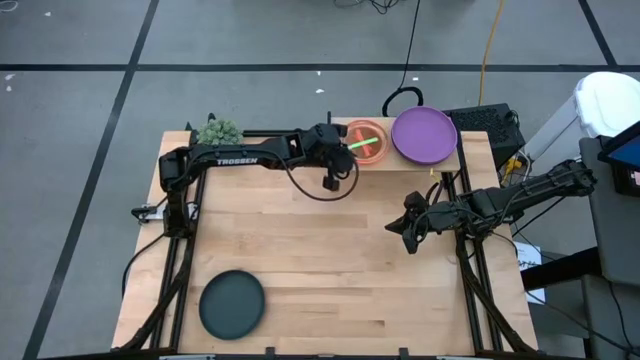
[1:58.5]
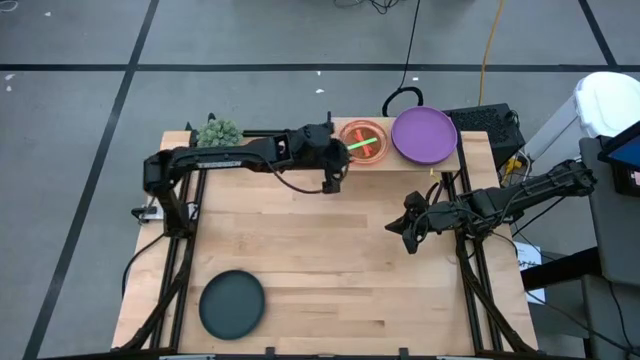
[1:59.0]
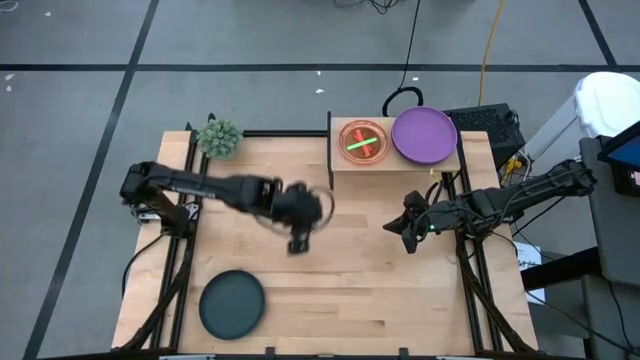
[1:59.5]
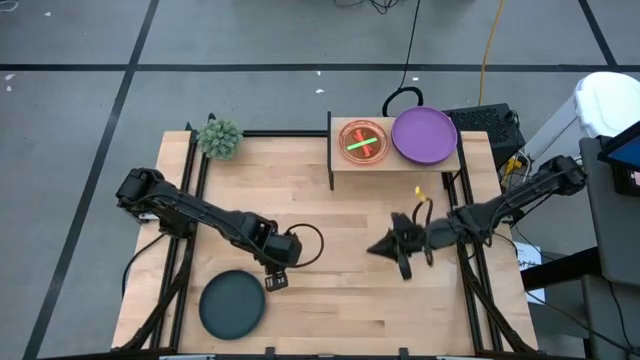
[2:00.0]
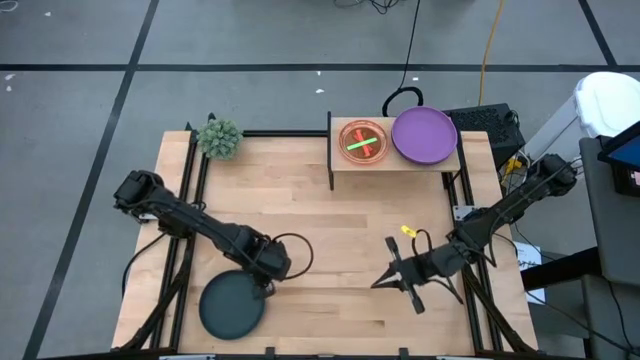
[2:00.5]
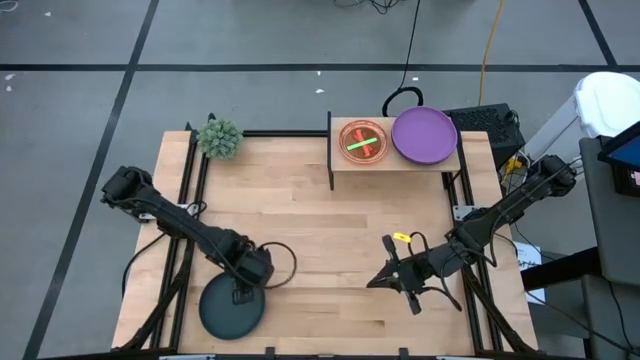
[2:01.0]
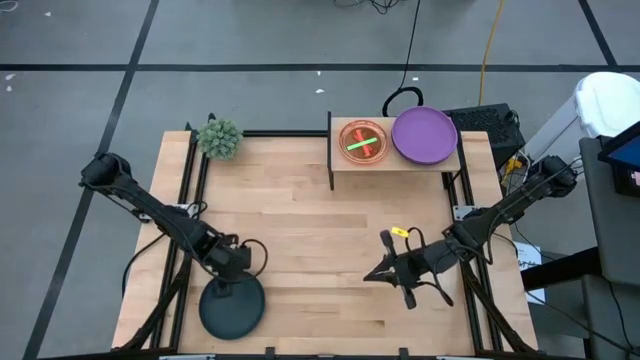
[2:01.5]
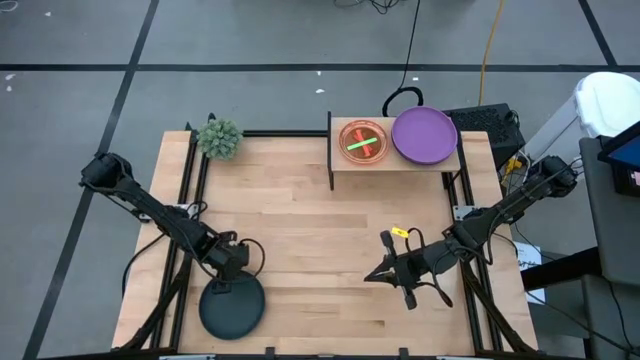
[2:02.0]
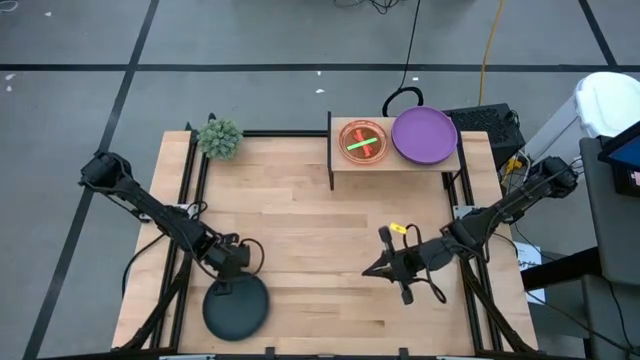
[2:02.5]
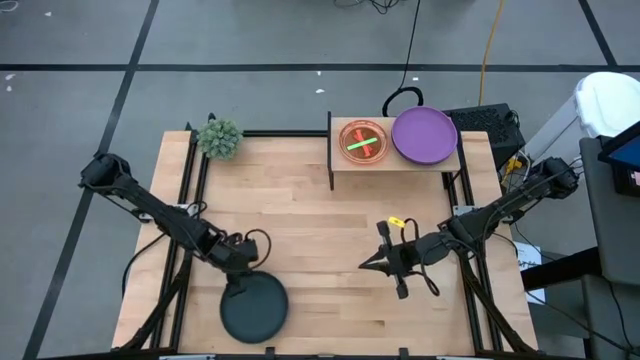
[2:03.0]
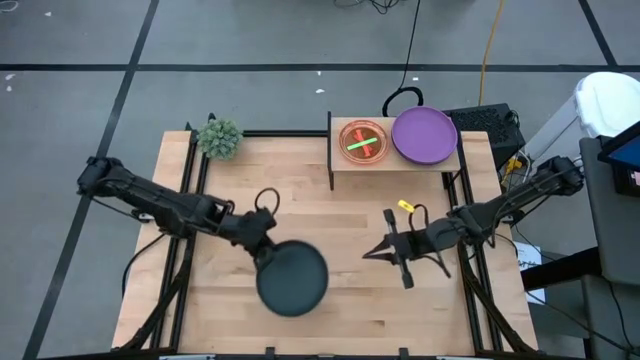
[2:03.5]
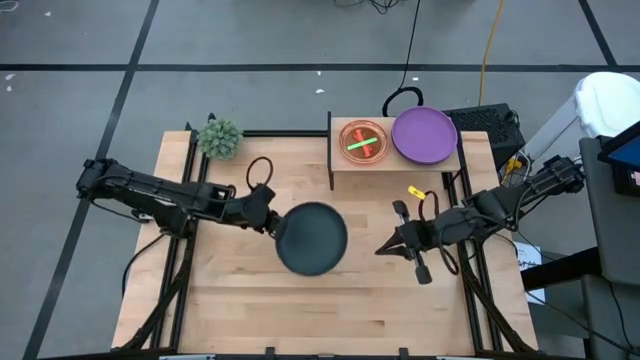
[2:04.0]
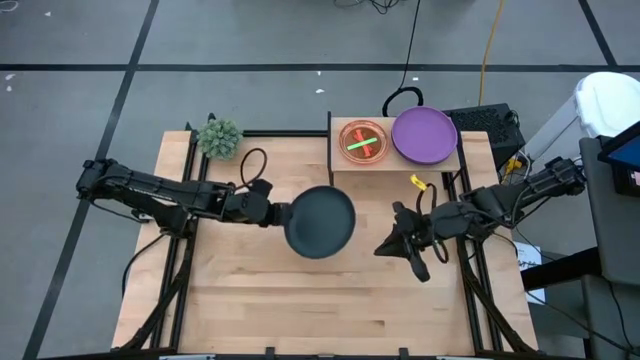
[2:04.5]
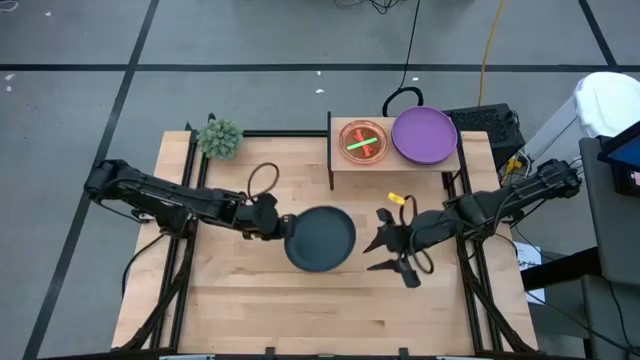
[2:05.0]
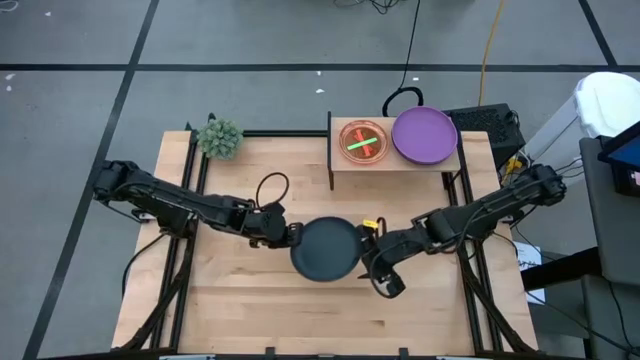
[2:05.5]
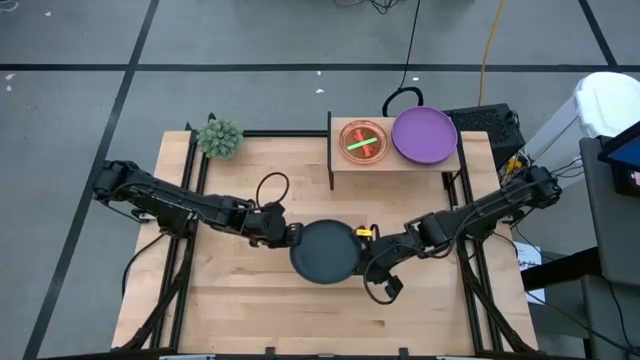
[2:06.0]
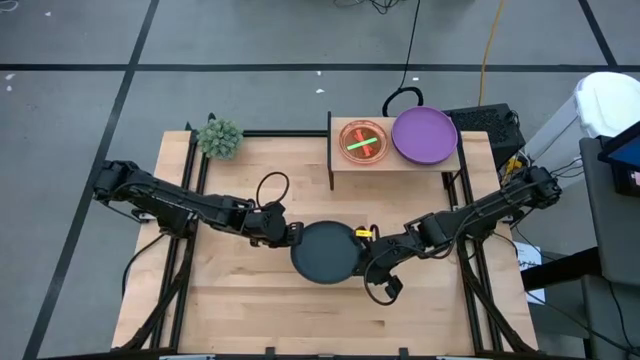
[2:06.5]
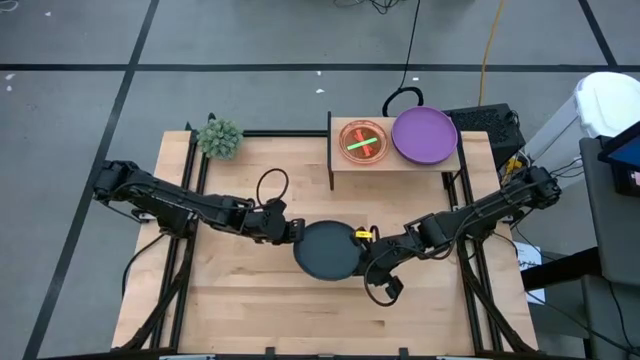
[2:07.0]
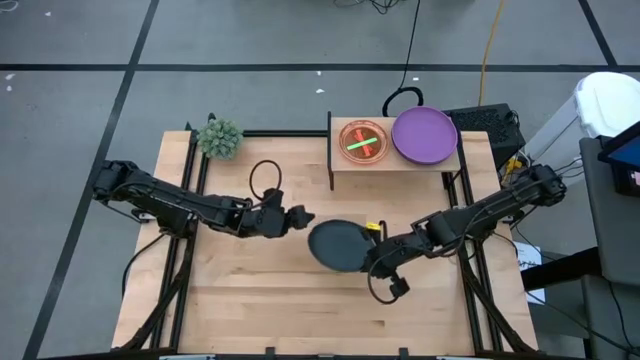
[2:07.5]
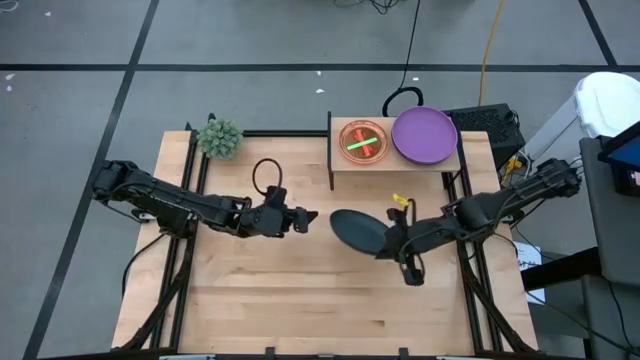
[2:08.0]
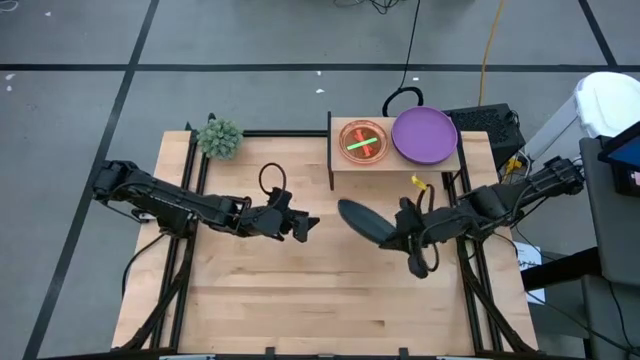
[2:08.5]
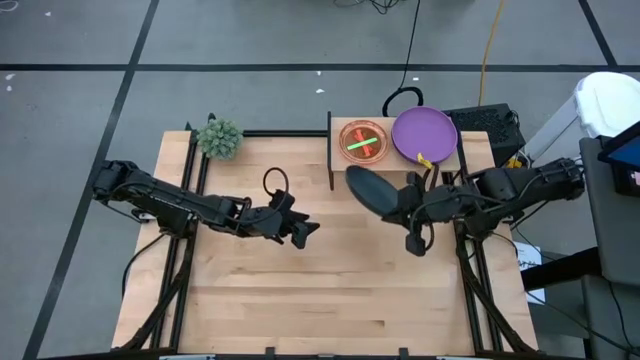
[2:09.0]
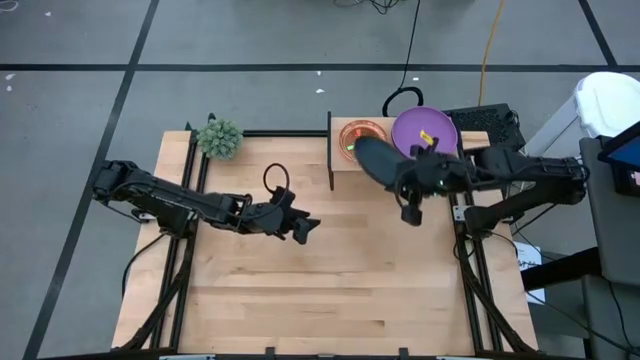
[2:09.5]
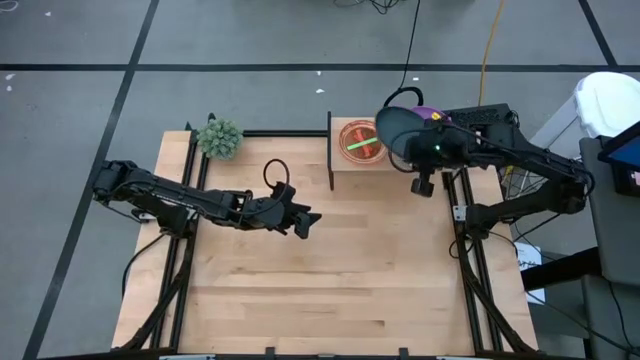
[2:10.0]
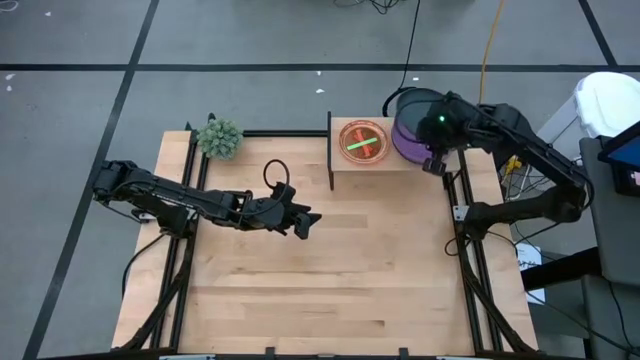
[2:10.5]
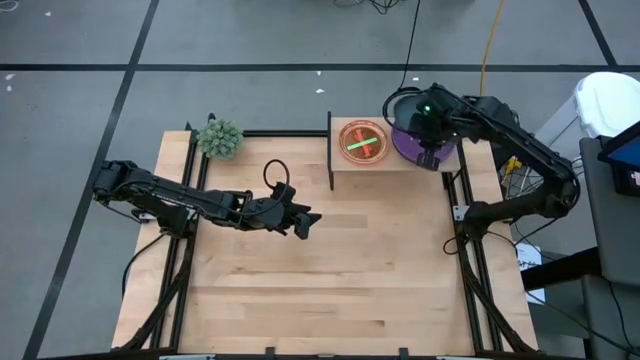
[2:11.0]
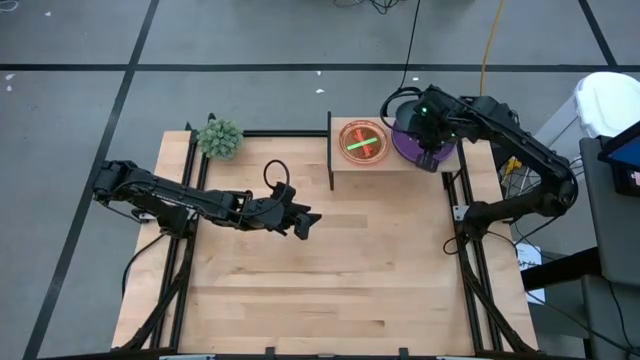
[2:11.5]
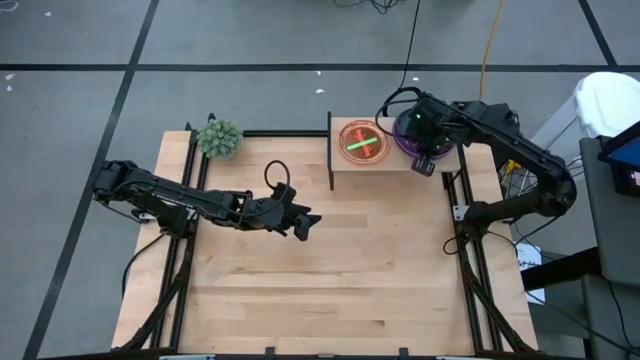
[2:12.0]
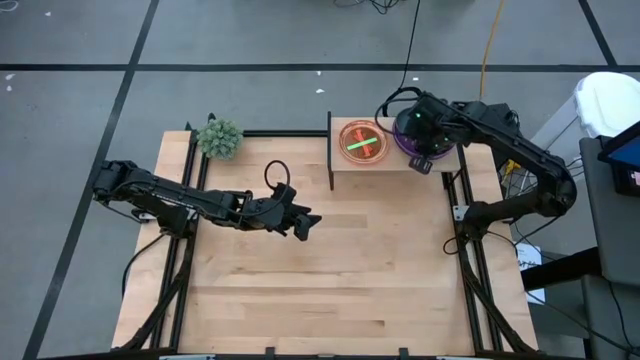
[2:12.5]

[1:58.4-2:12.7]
Task: Place and stack plates onto a shelf
Stack the black plate on the violet plate on the shelf

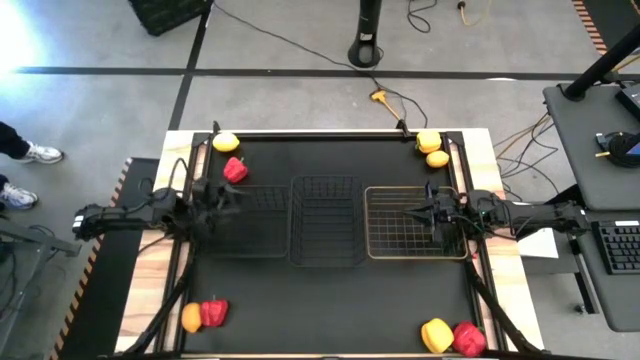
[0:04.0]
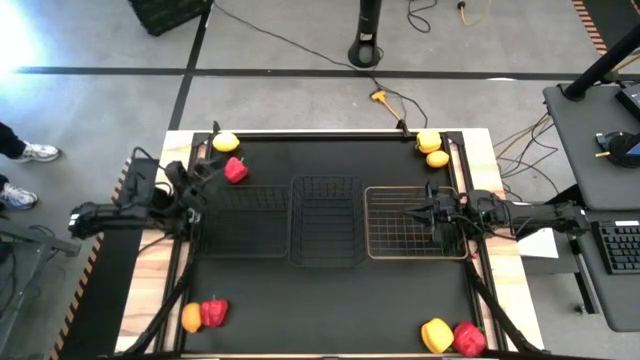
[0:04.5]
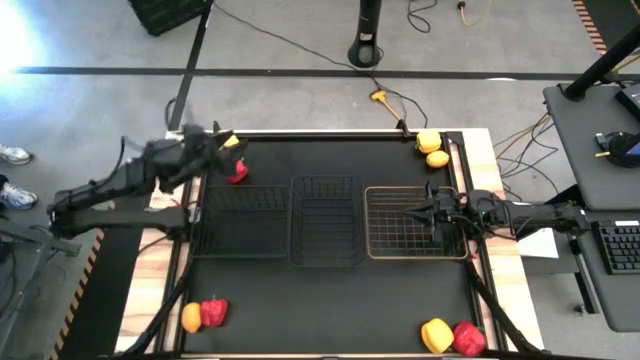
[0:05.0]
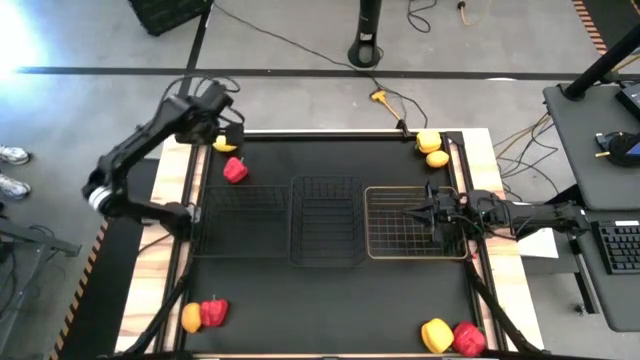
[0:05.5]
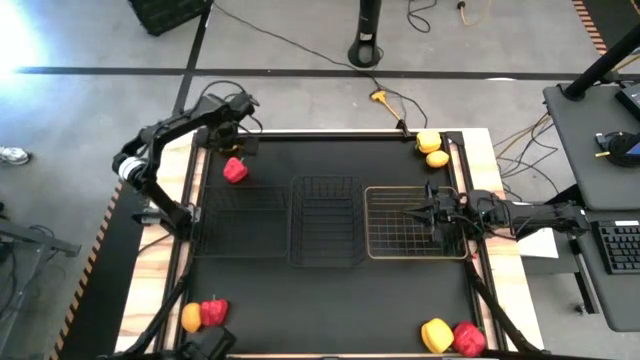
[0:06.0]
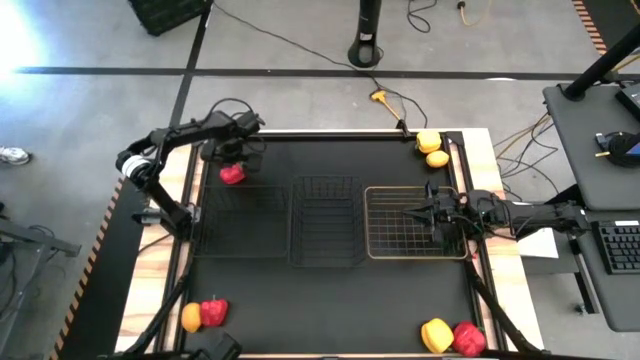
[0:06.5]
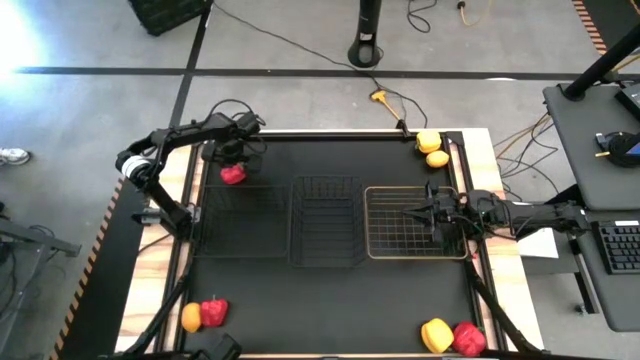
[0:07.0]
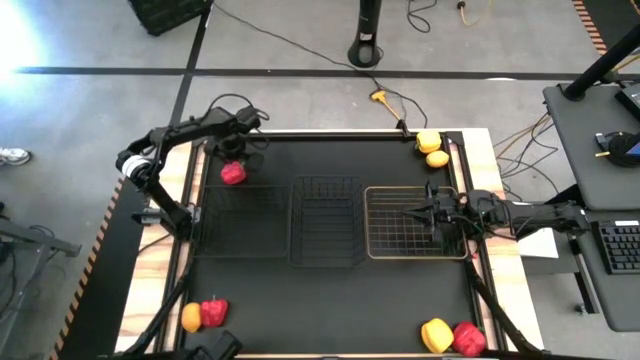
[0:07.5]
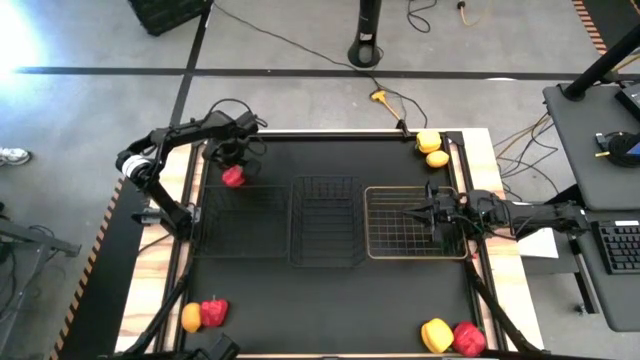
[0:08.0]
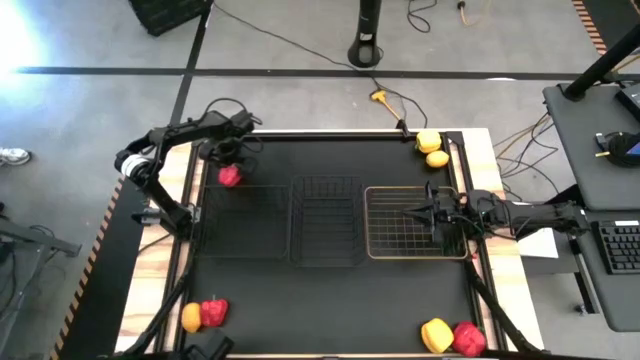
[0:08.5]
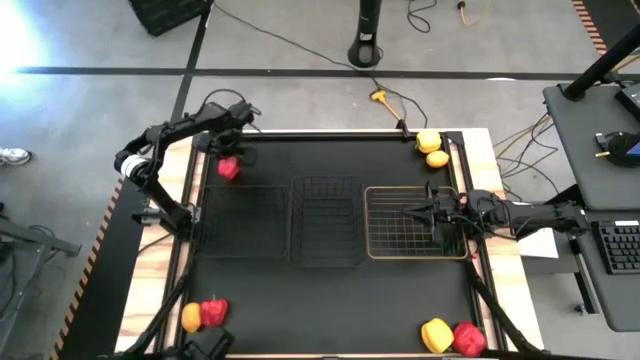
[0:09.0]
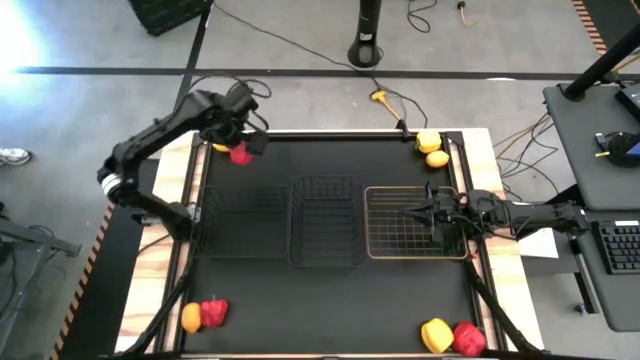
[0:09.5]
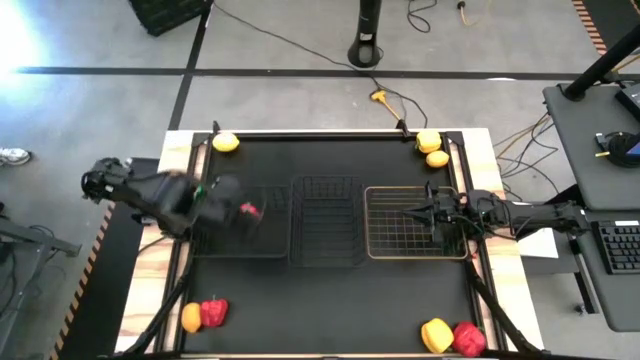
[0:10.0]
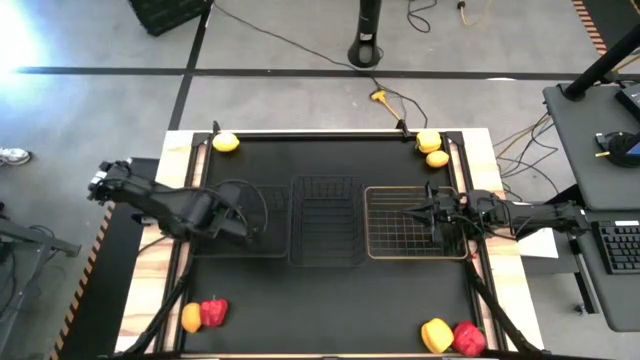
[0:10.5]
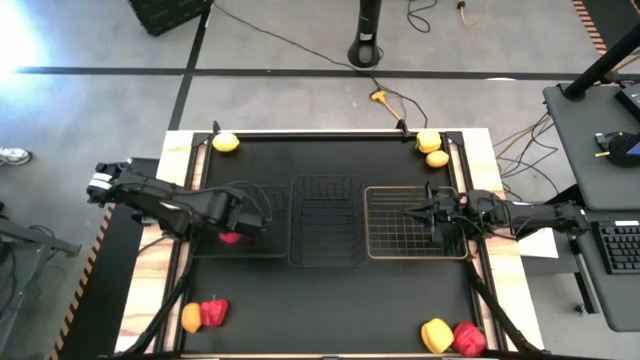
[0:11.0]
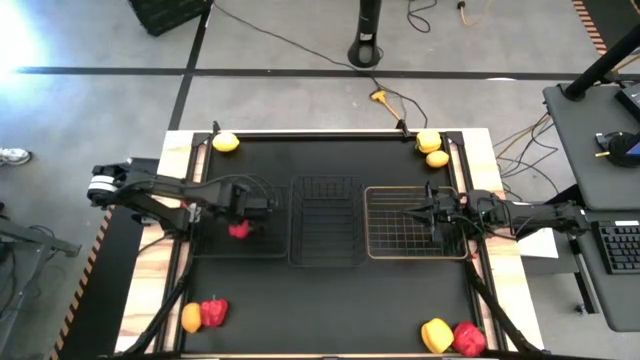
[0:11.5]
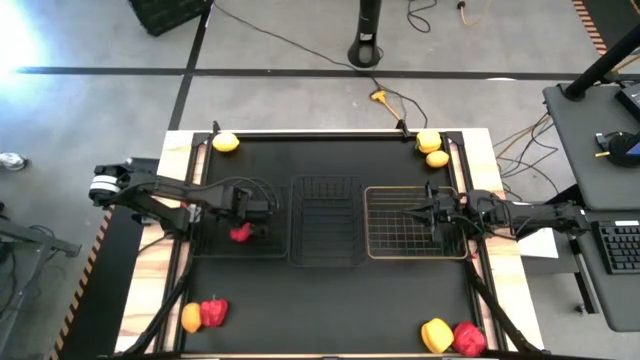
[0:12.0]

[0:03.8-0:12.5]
Task: Sort produce into baskets
Put the top red bell pepper into the left black wire basket
